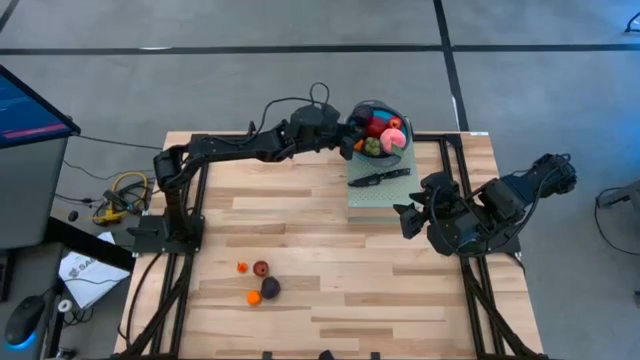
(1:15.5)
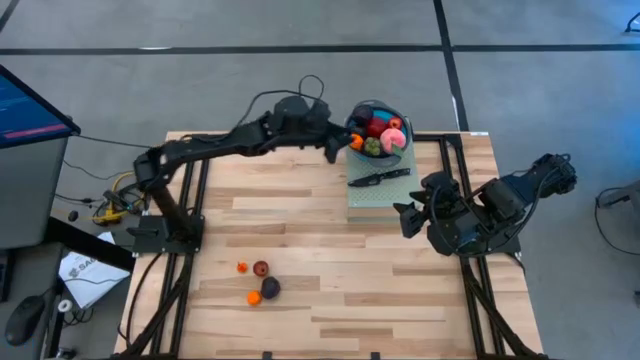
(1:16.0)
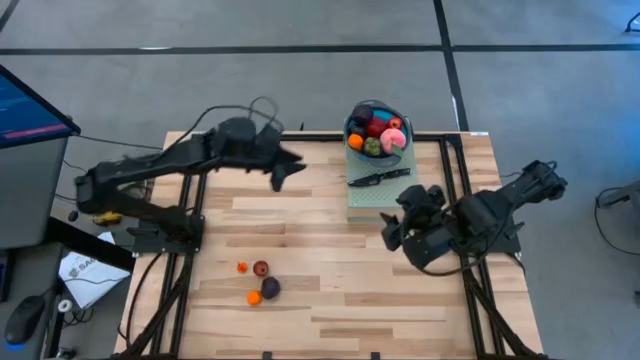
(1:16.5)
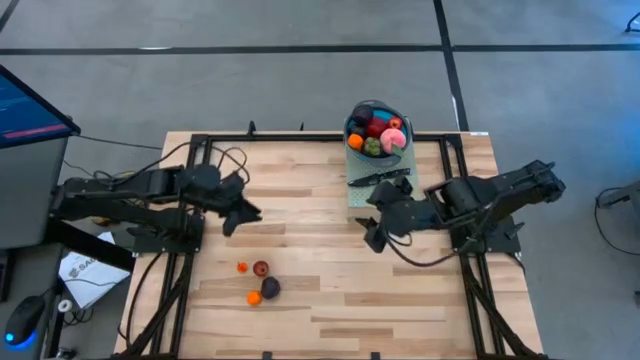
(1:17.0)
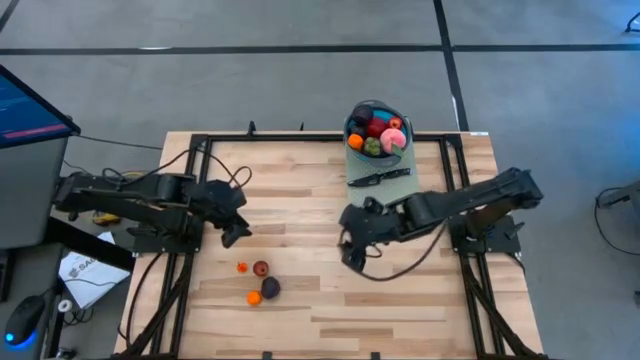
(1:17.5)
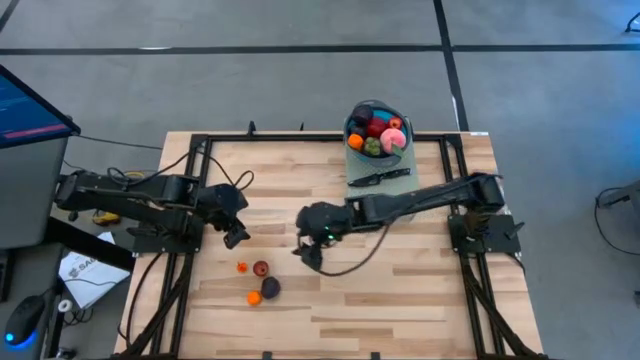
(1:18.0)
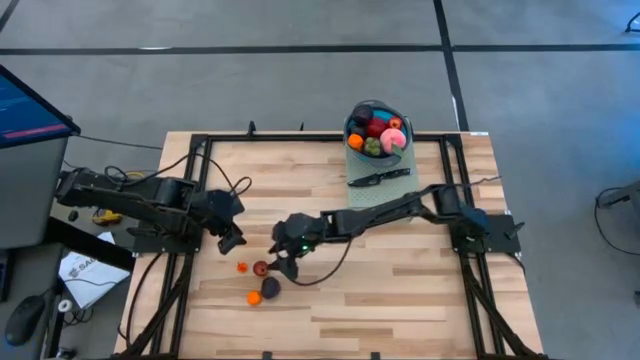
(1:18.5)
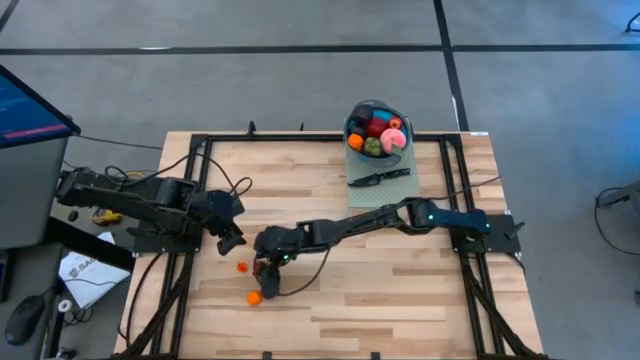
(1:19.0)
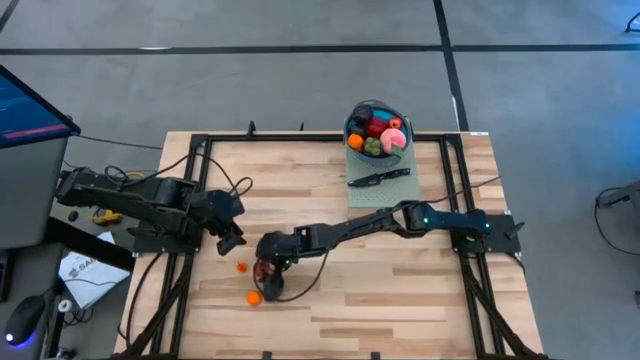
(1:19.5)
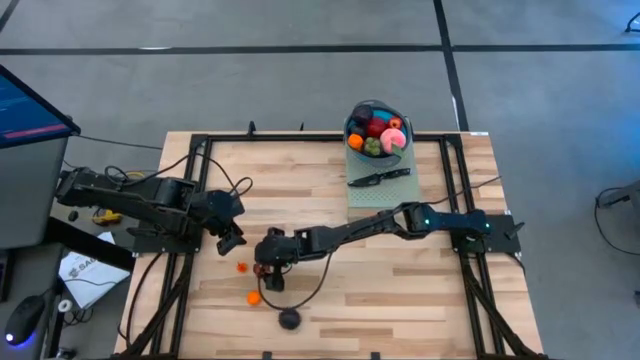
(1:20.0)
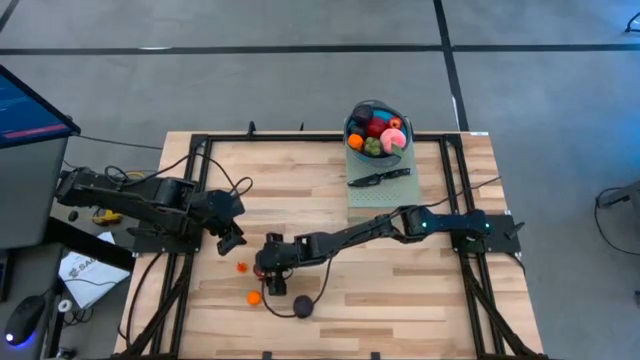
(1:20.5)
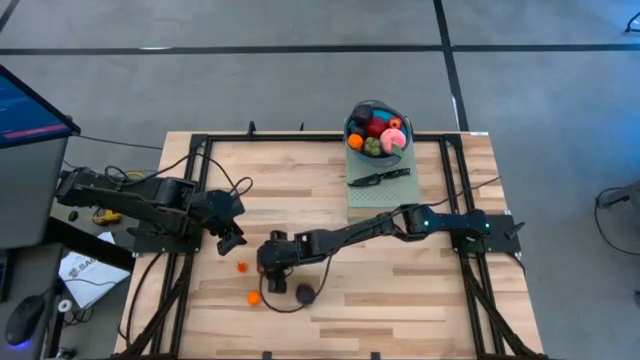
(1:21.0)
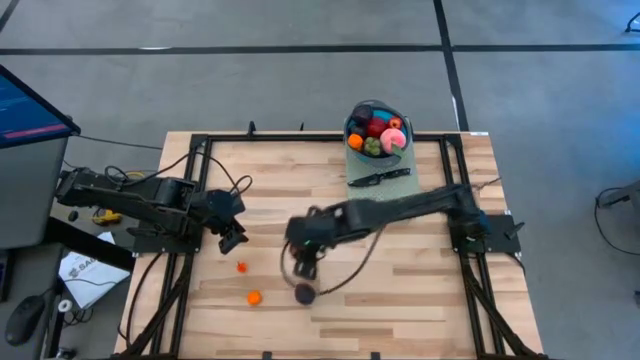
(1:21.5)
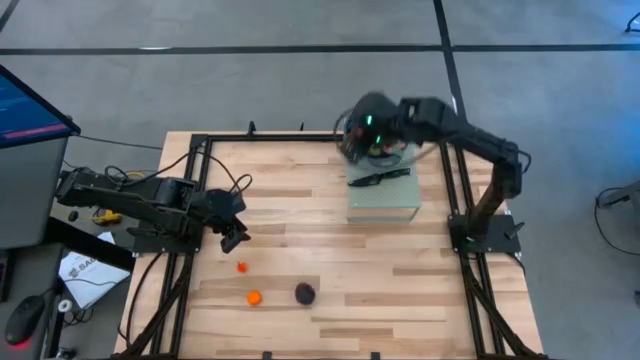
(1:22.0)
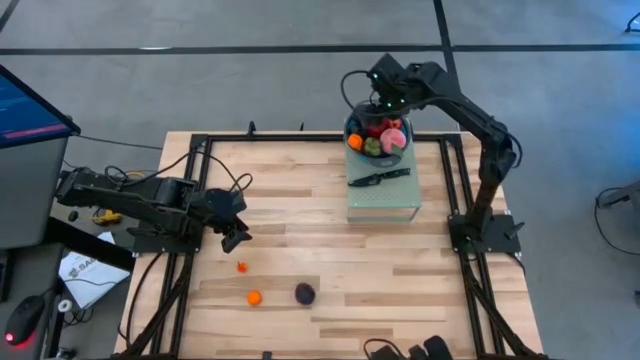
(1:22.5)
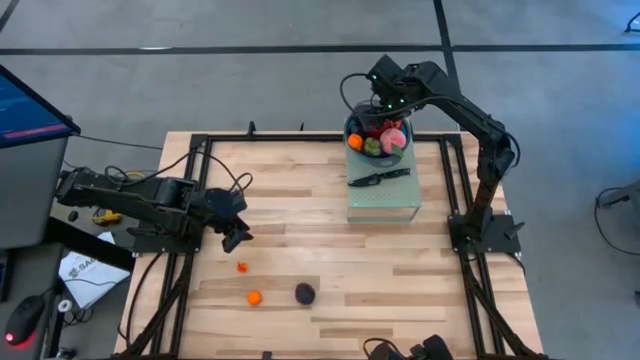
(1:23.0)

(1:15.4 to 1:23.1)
Task: Pick & Place Fruit
Put the red pomegranate into the blue strainer bowl on the shelf

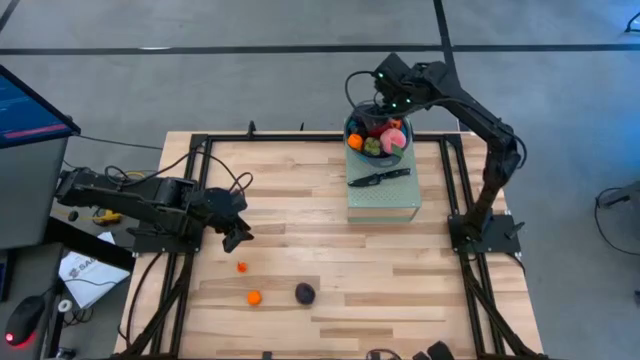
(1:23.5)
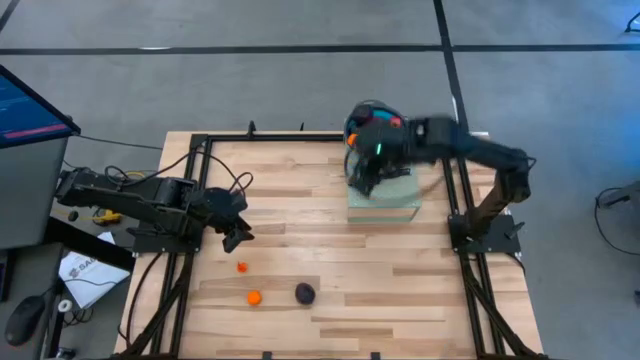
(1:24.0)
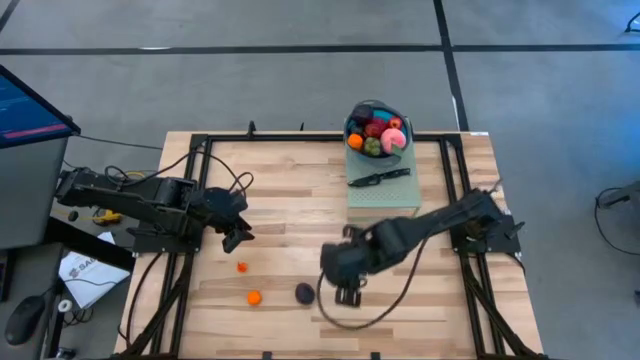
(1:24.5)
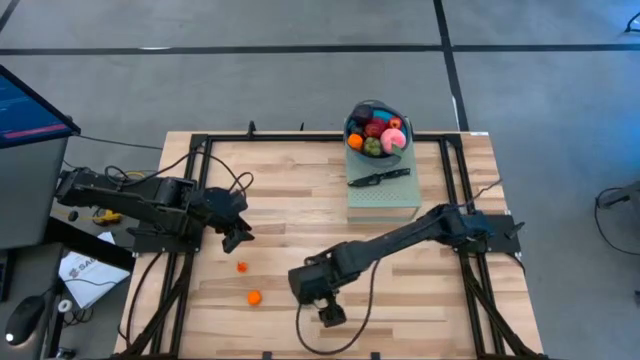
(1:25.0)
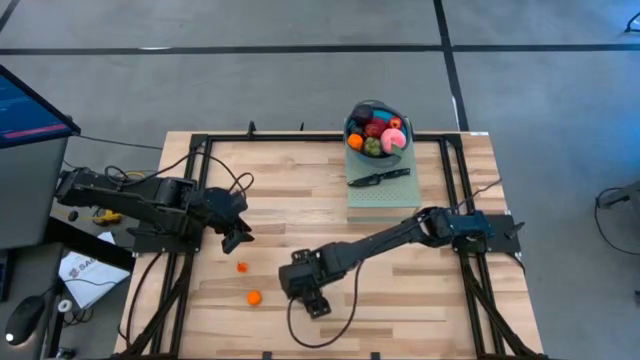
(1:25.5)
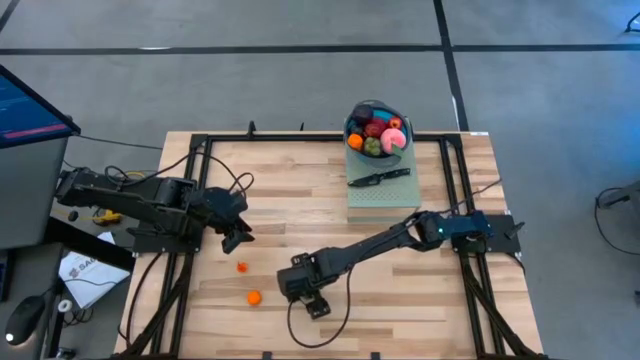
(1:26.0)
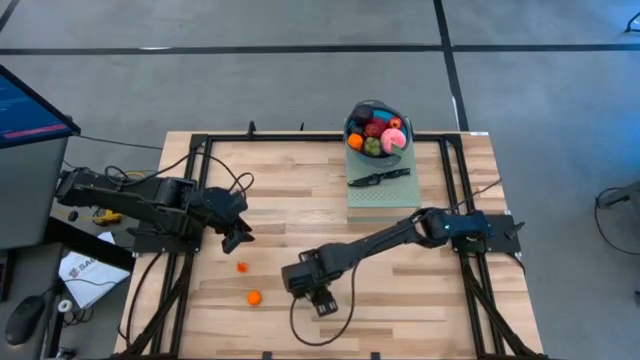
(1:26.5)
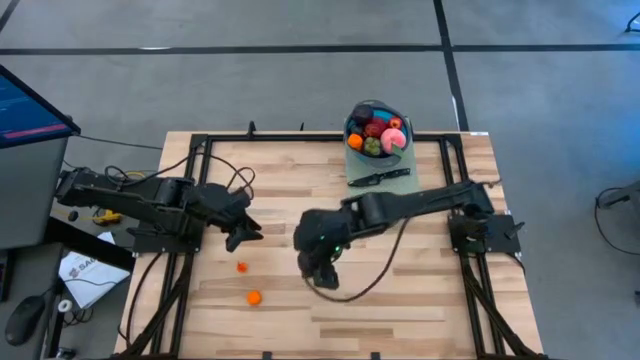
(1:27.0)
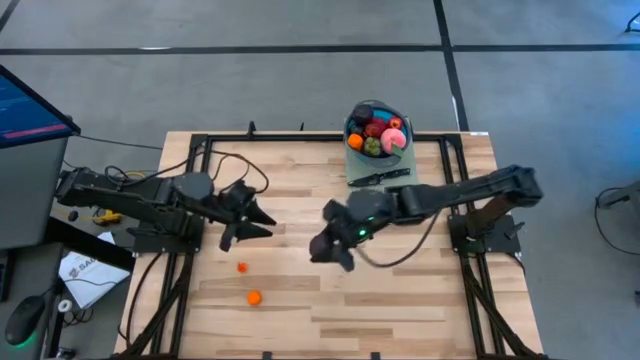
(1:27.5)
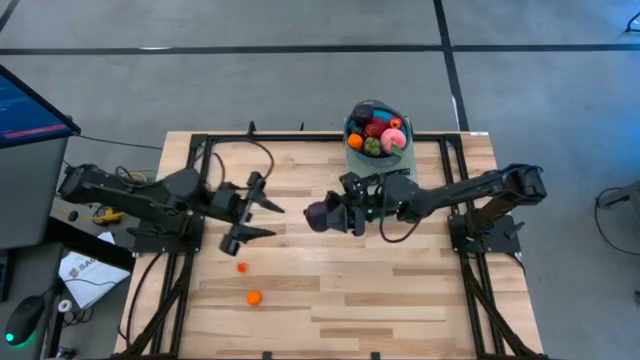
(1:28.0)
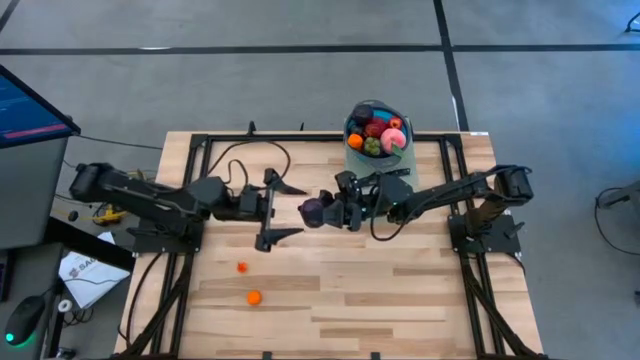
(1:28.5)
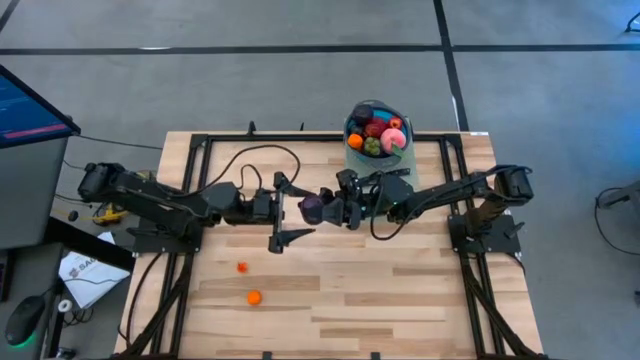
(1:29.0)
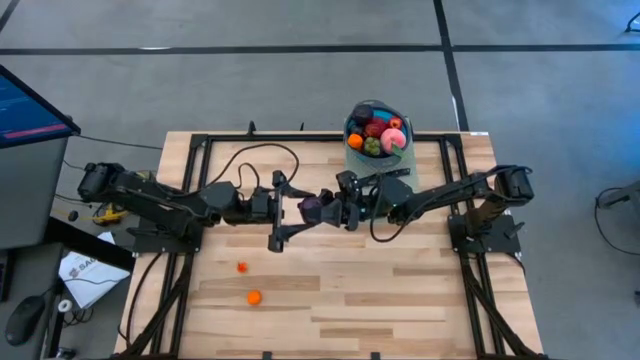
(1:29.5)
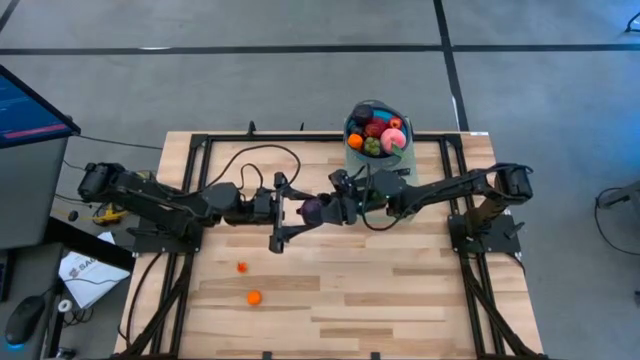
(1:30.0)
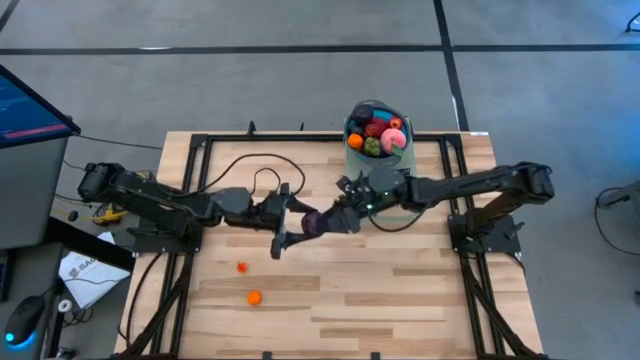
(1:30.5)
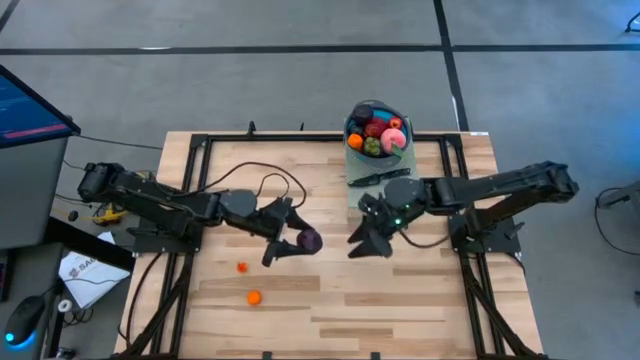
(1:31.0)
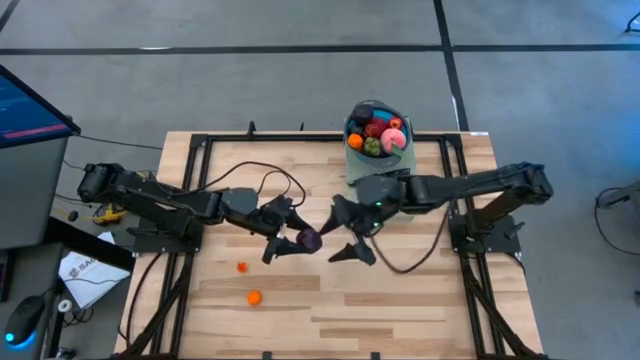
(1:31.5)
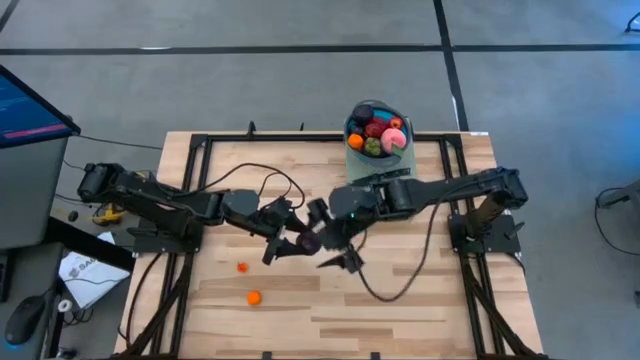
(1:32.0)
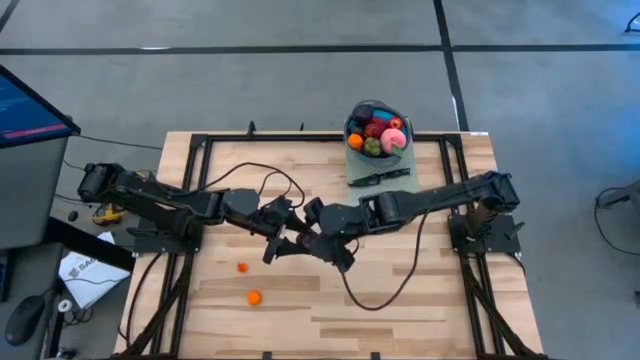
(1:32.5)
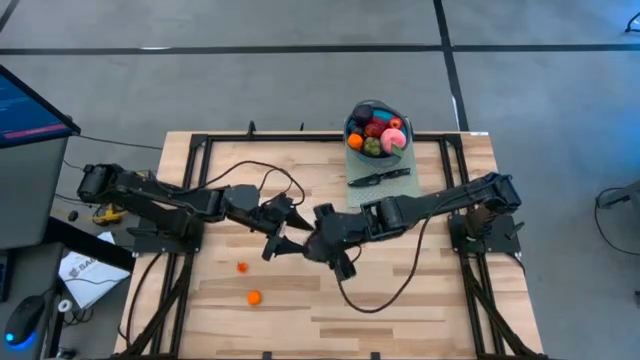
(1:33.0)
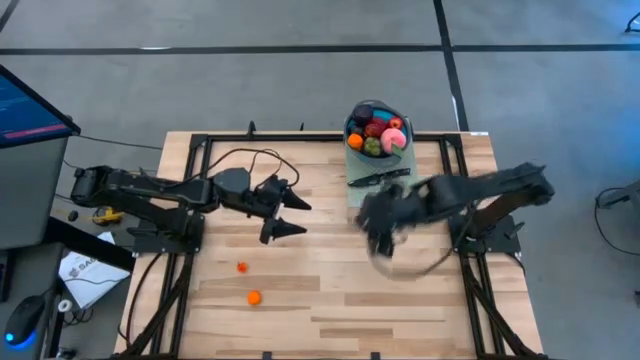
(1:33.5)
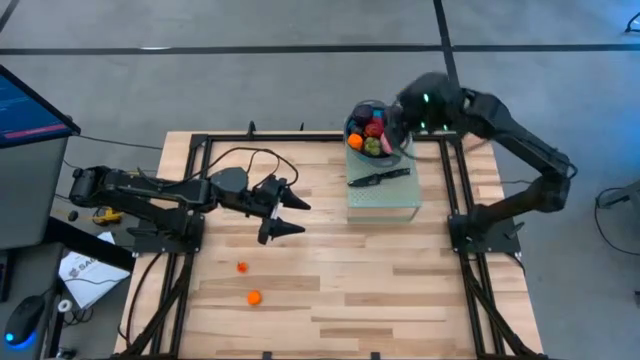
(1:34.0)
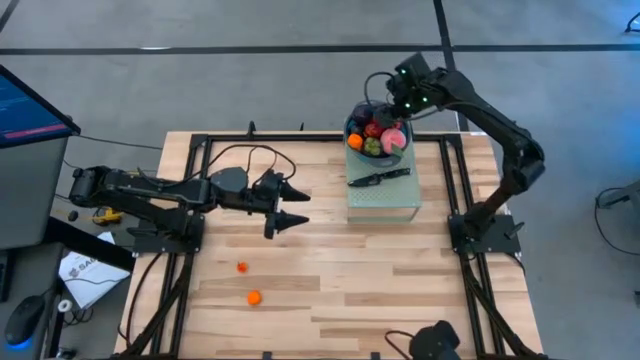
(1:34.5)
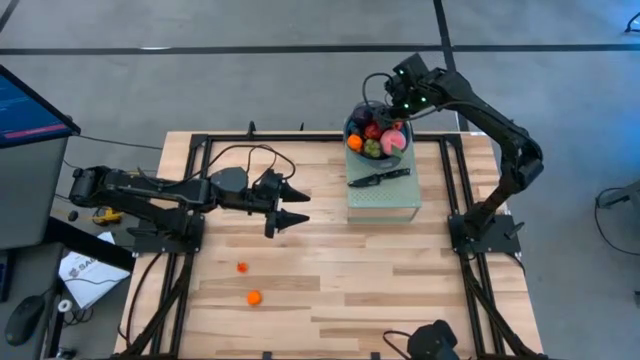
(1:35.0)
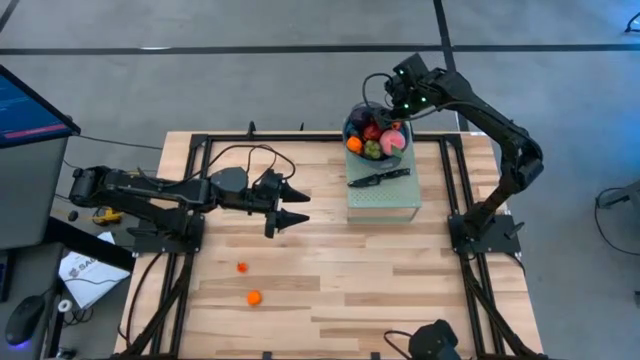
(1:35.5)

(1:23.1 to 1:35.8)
Put the violet plum into the blue strainer bowl on the shelf
